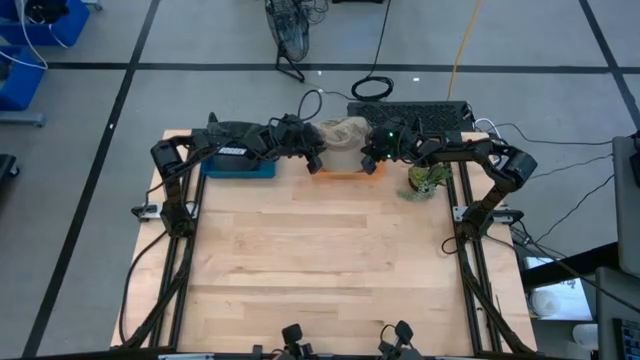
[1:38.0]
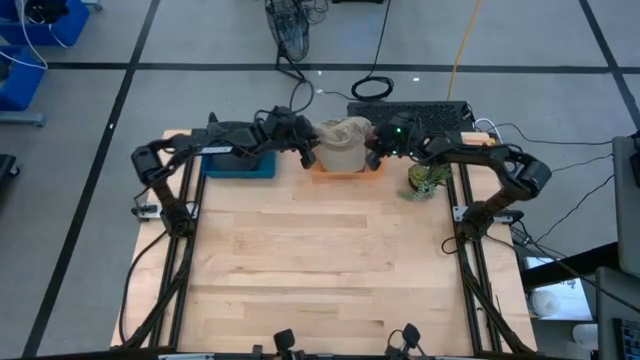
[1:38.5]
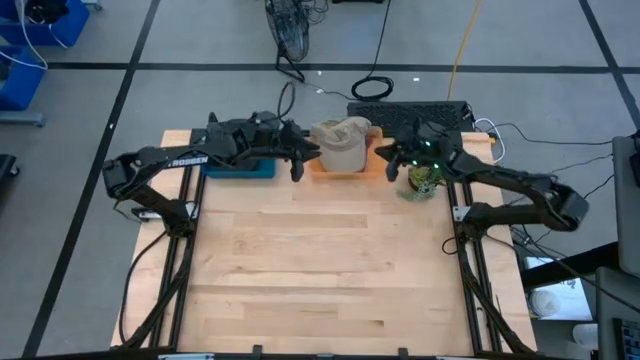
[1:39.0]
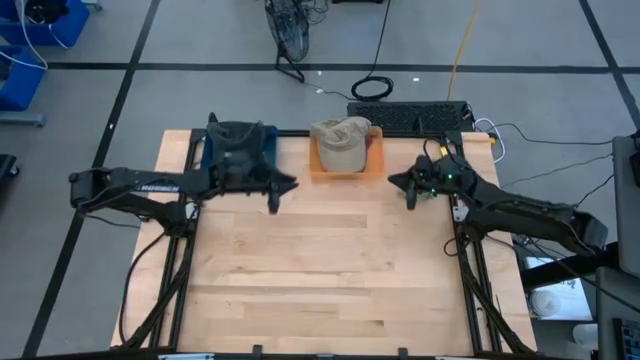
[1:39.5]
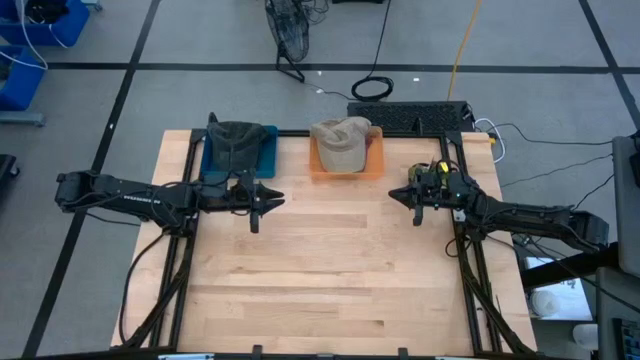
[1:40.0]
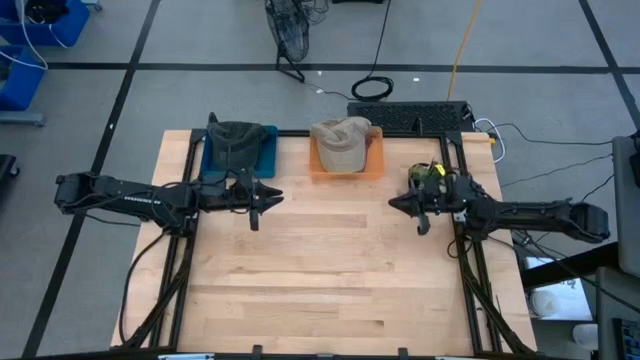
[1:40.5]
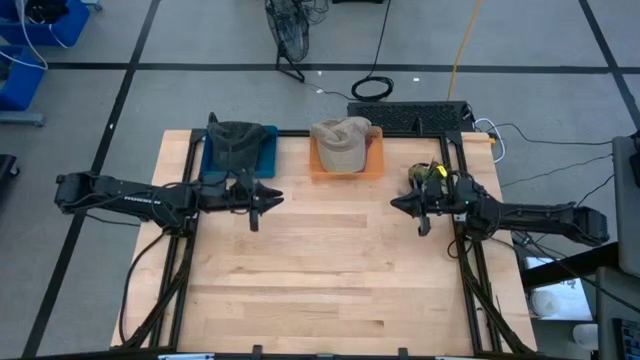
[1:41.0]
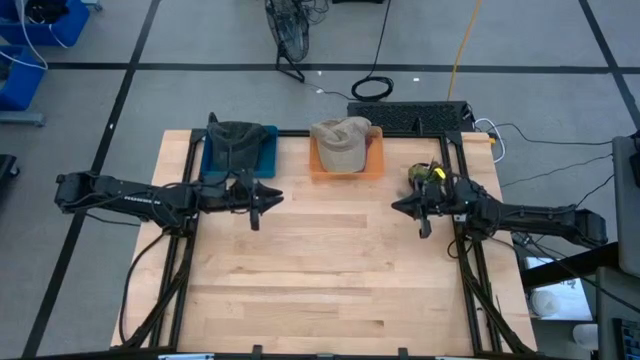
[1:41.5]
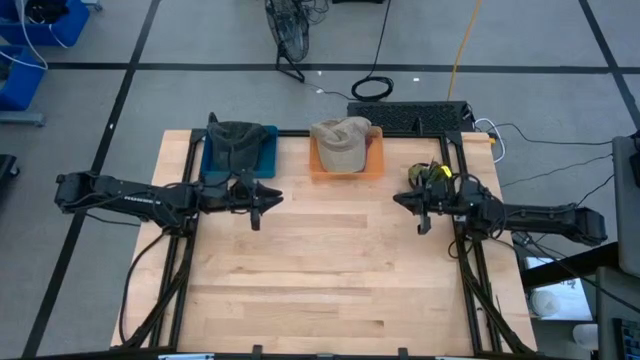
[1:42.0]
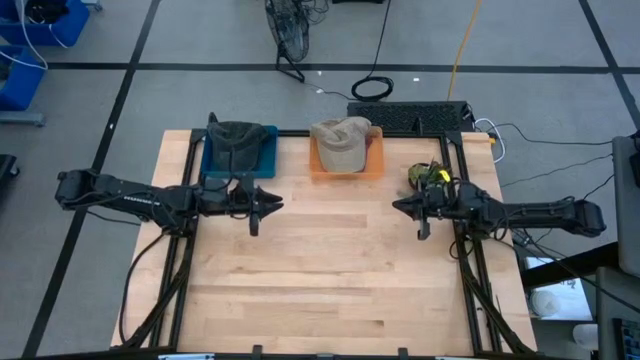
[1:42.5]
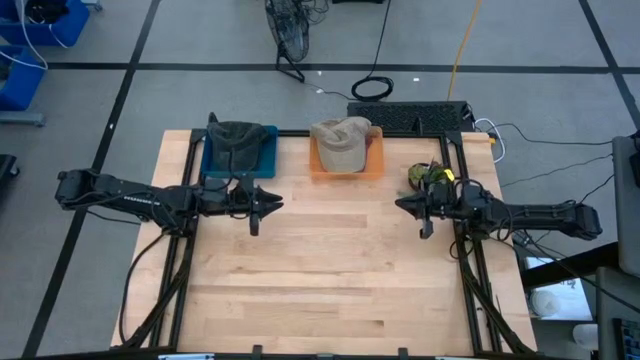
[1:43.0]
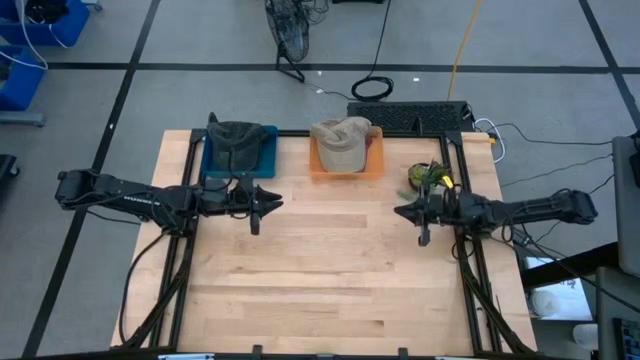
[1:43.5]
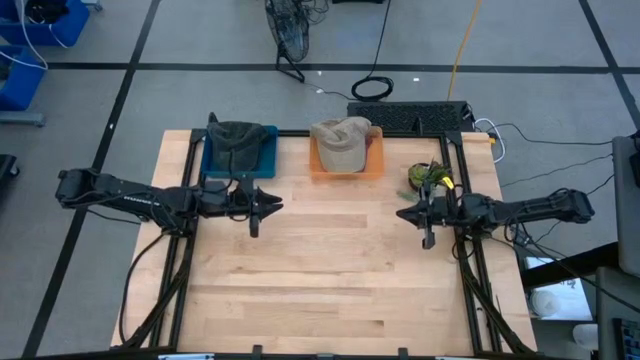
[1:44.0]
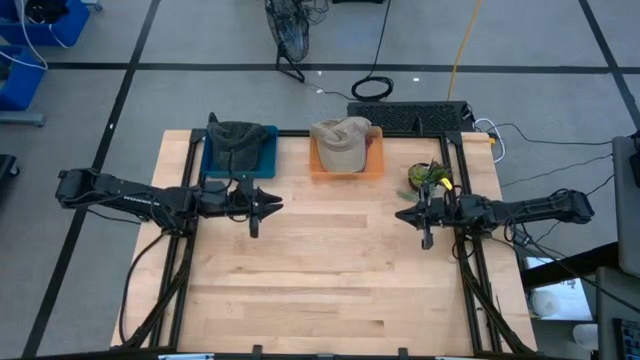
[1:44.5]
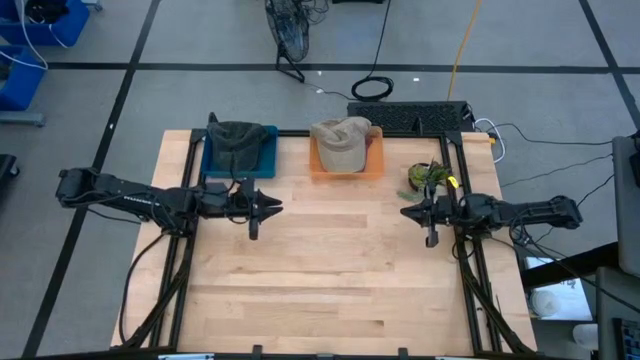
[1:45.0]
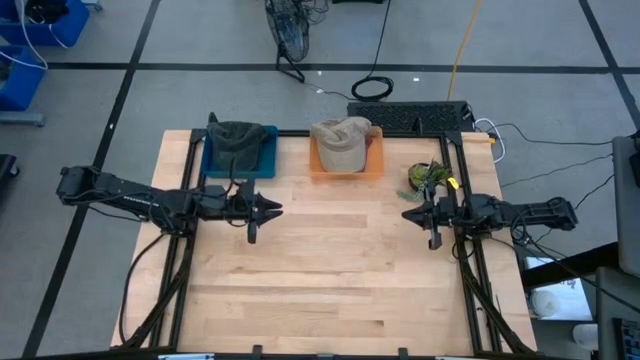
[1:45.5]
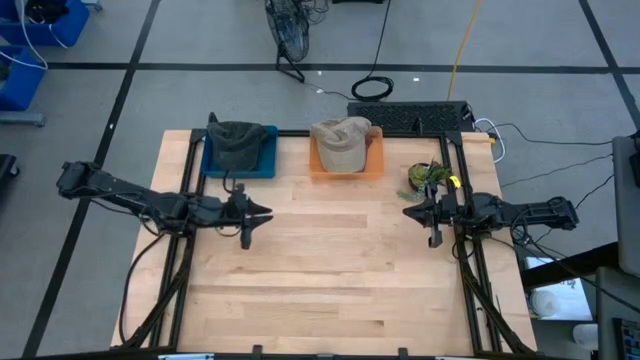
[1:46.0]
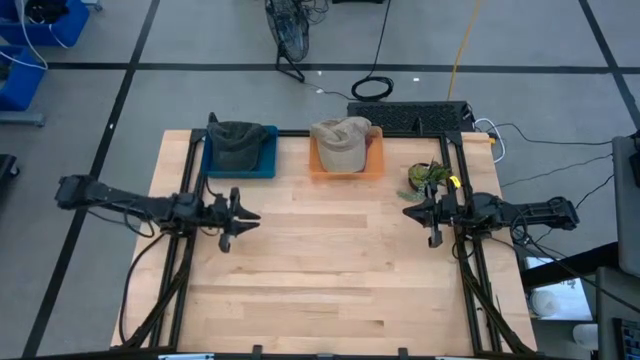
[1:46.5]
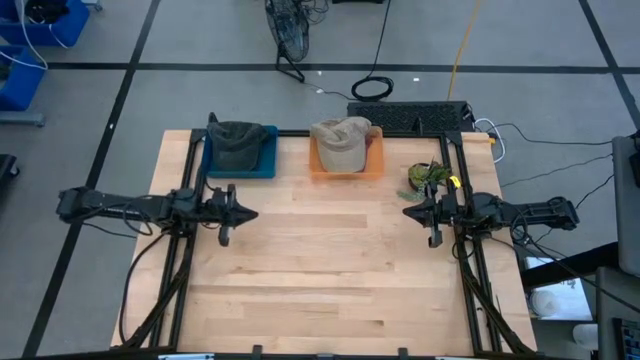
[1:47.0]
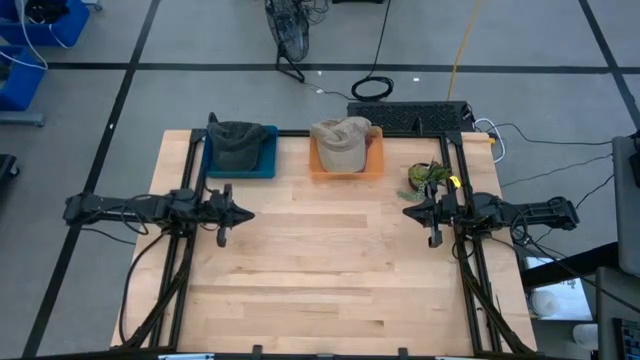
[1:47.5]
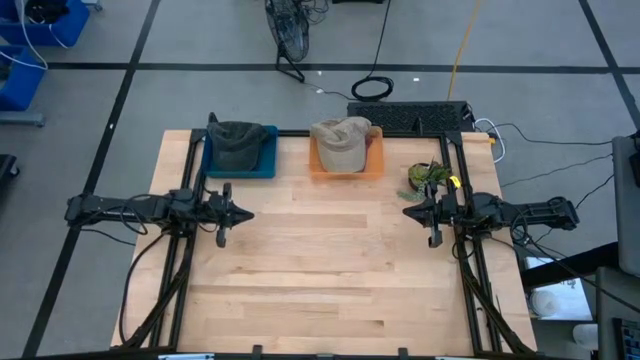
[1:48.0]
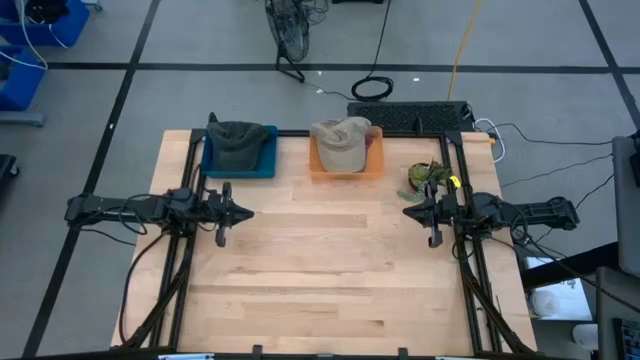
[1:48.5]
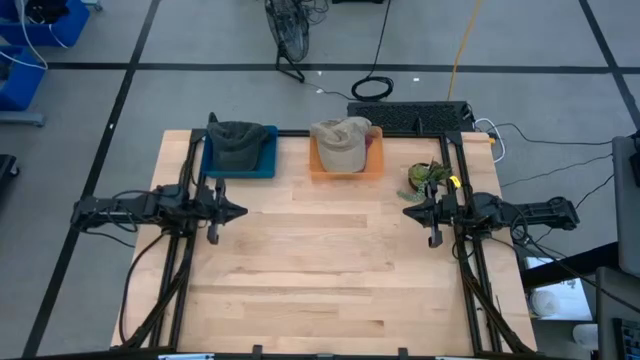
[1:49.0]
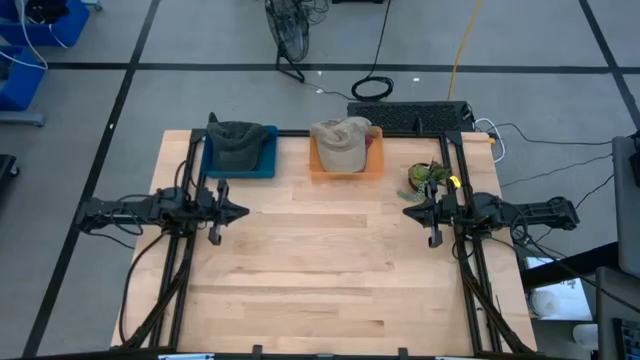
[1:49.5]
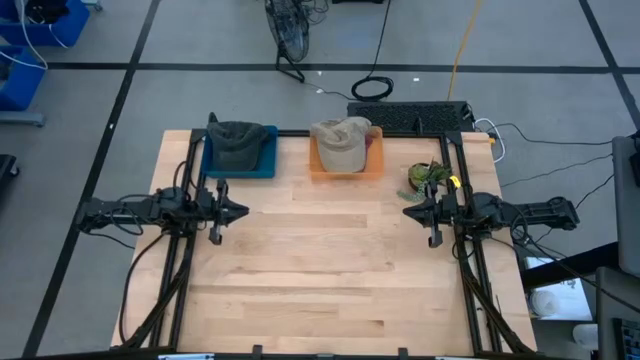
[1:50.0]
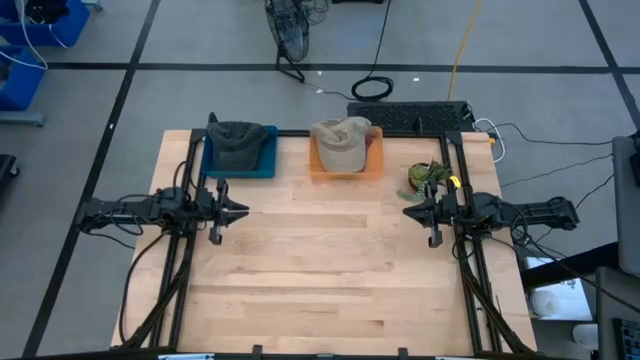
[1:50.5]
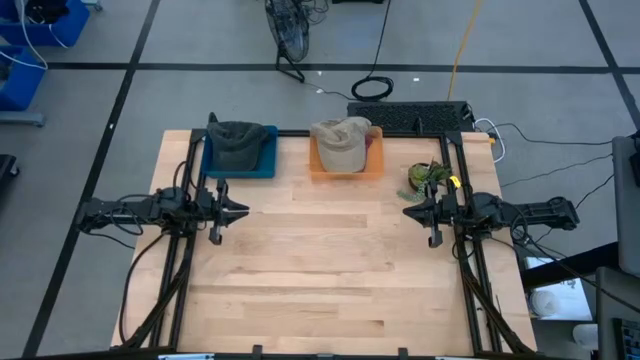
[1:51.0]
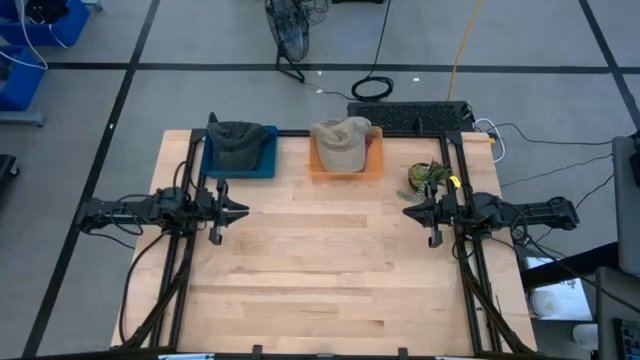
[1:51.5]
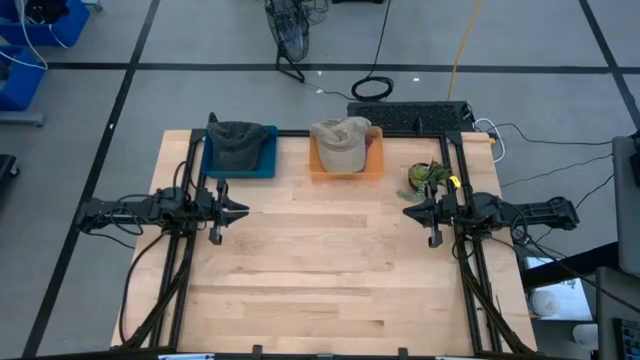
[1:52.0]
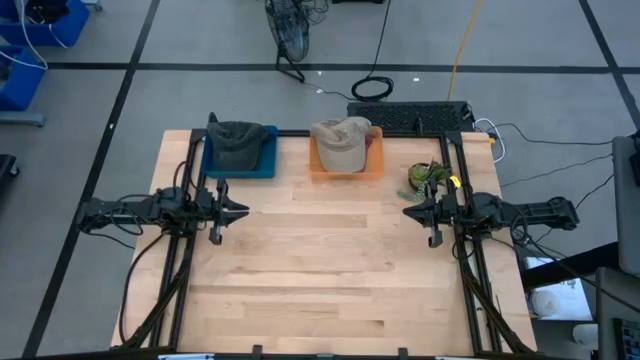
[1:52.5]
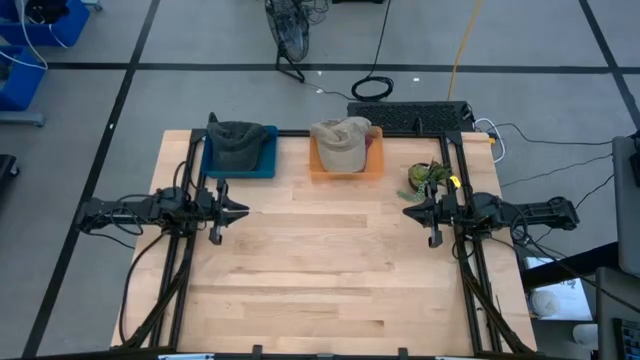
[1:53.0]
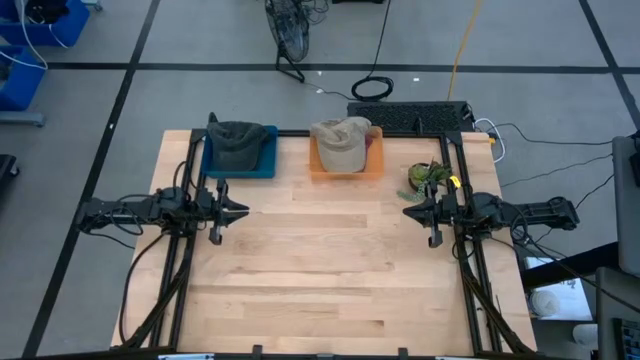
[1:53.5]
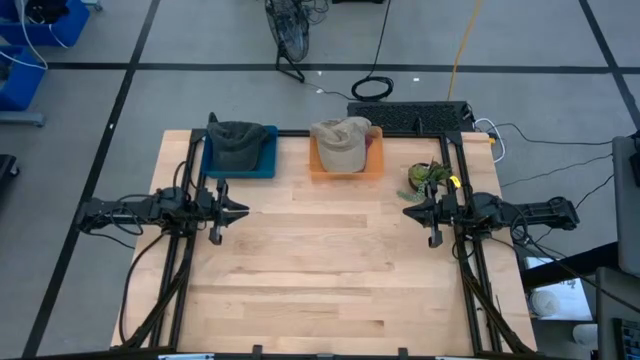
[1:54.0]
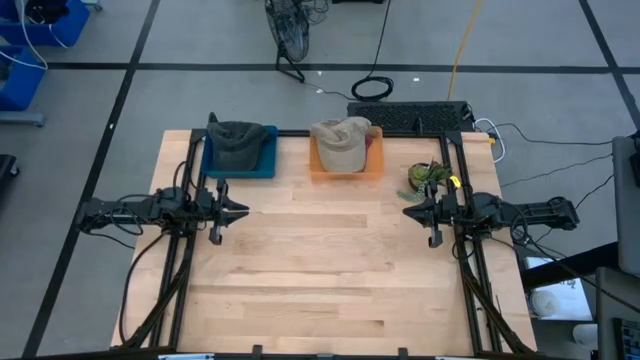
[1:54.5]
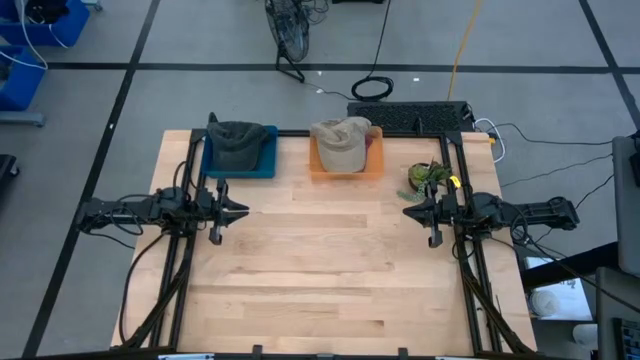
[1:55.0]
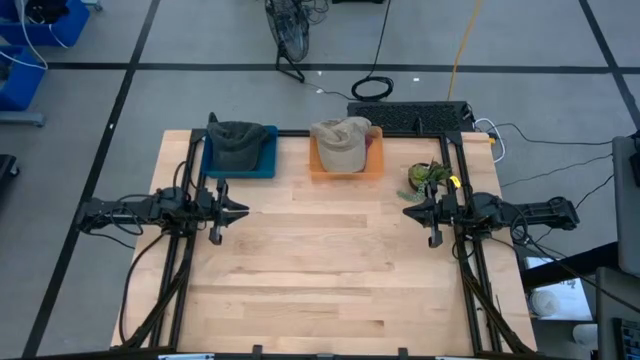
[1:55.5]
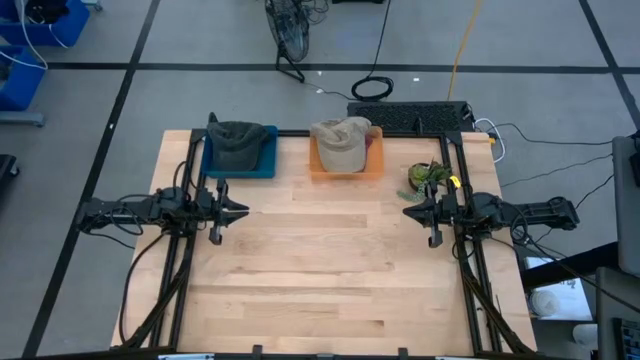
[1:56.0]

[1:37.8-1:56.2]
Task: Pick & Place hat
Return to Home Position

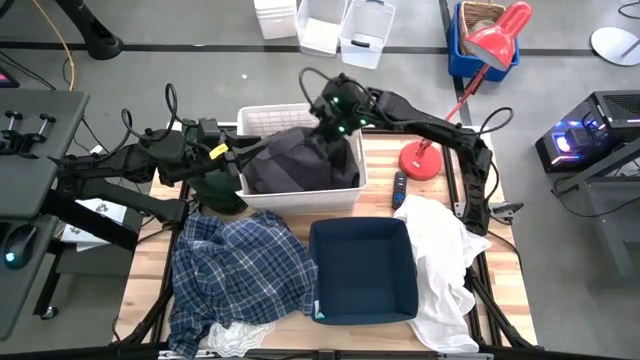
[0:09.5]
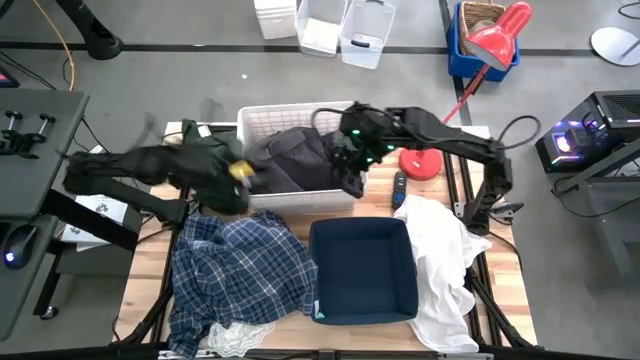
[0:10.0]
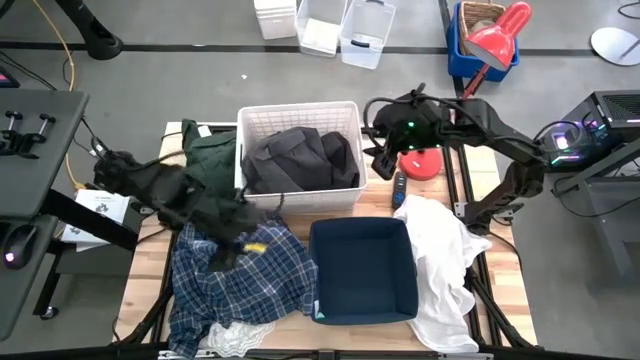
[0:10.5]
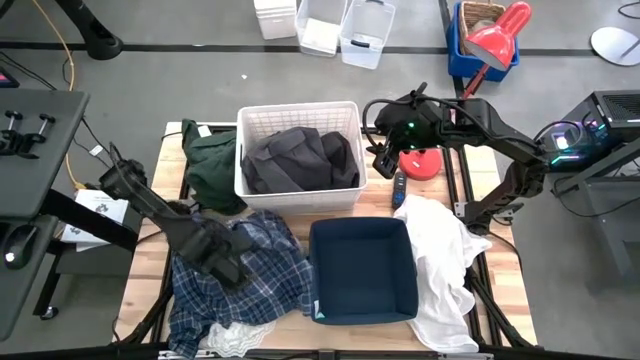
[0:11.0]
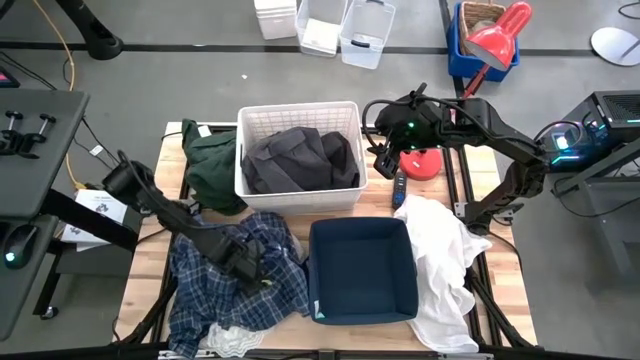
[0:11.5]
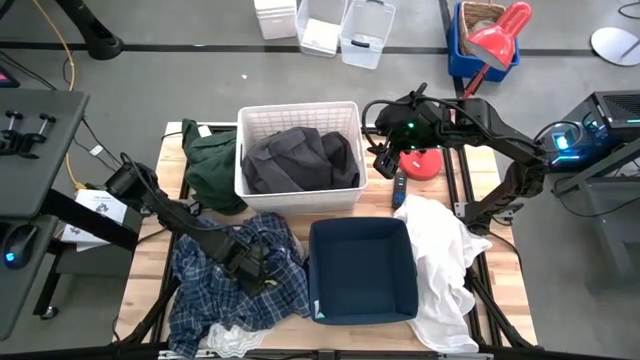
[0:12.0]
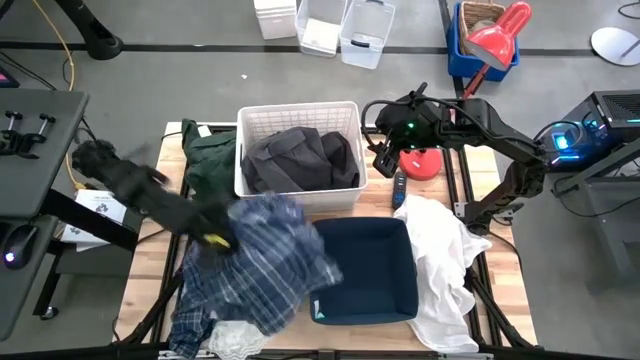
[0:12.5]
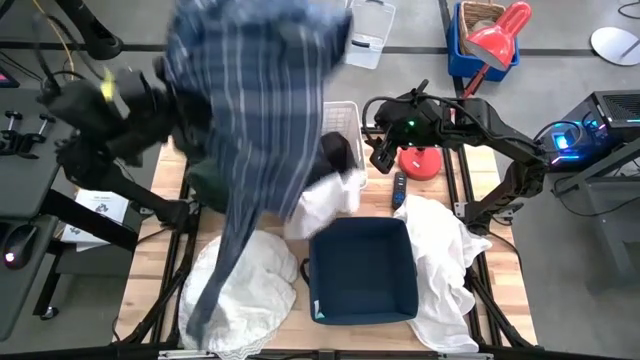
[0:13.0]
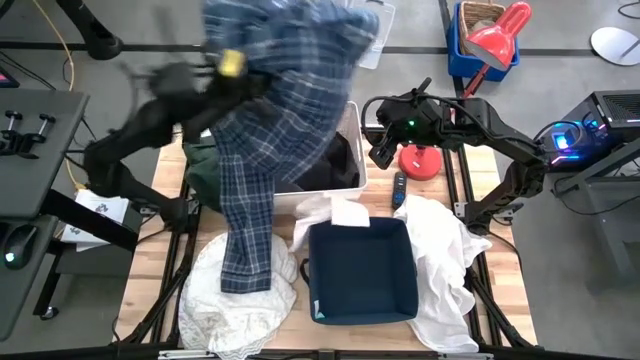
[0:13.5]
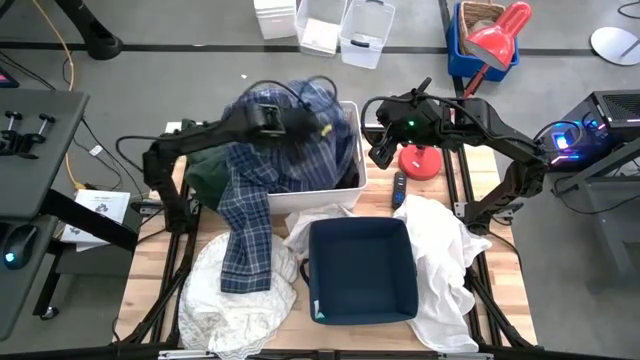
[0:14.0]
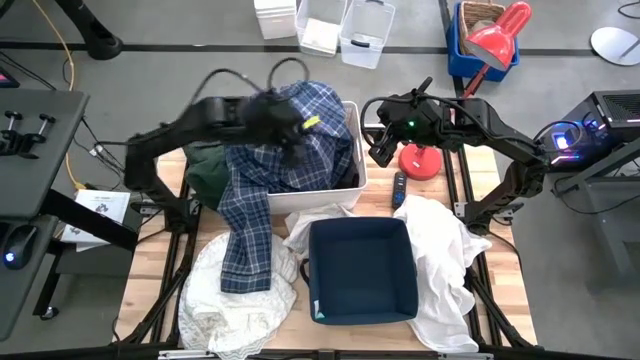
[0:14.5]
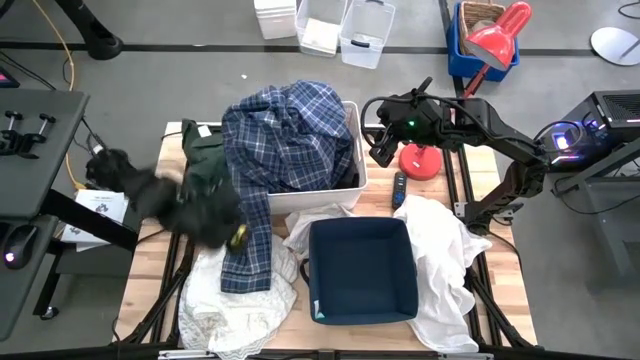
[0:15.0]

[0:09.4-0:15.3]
Task: Sort clothes
Put the blue polo into the white laundry bin
